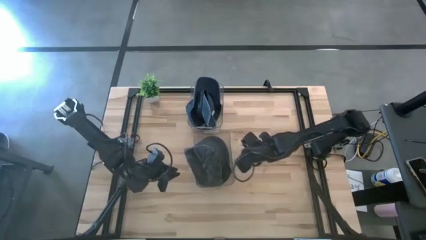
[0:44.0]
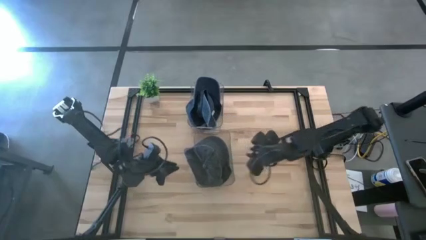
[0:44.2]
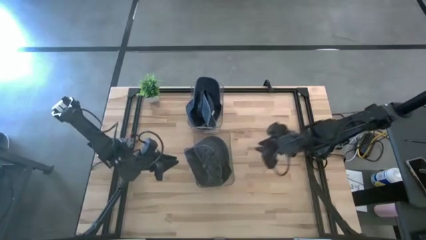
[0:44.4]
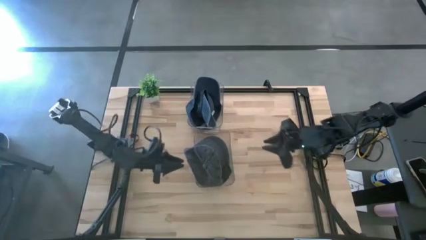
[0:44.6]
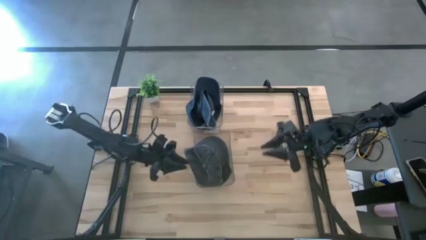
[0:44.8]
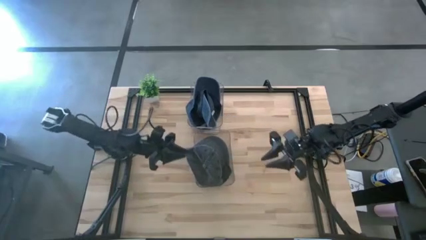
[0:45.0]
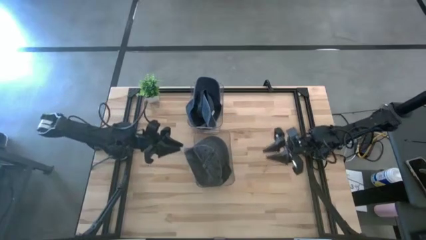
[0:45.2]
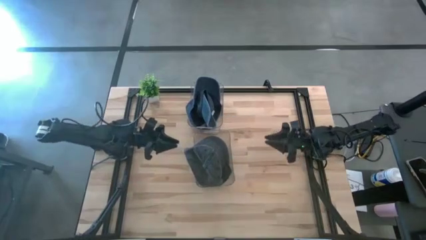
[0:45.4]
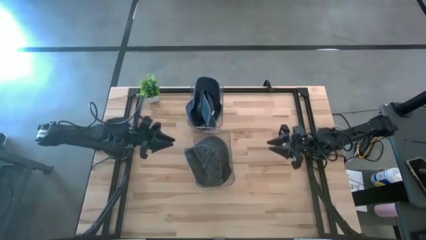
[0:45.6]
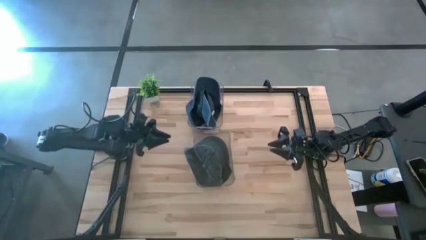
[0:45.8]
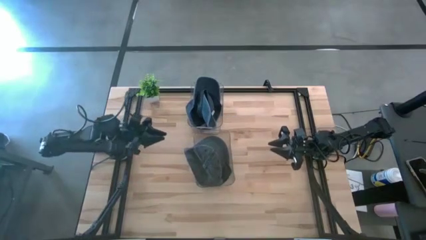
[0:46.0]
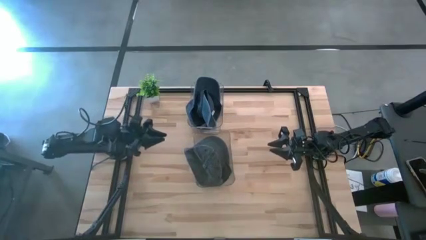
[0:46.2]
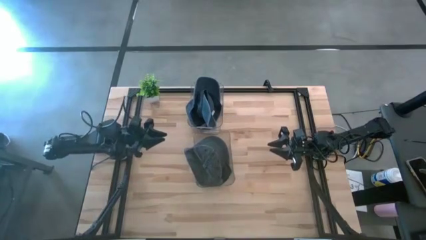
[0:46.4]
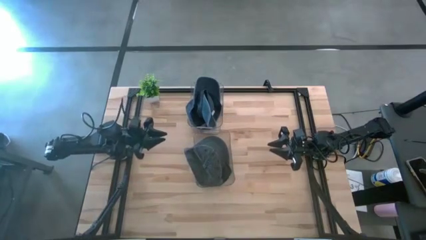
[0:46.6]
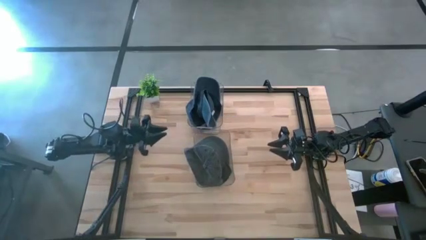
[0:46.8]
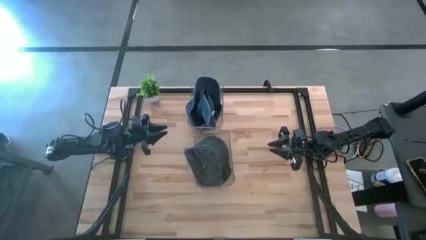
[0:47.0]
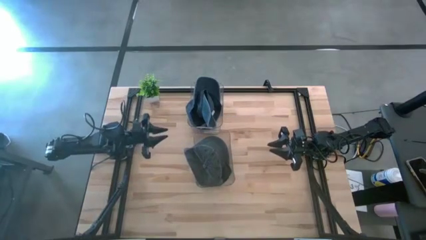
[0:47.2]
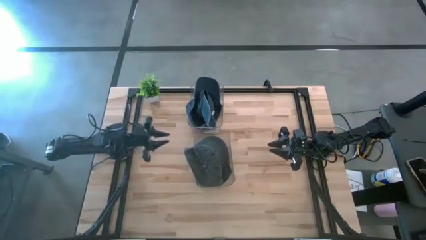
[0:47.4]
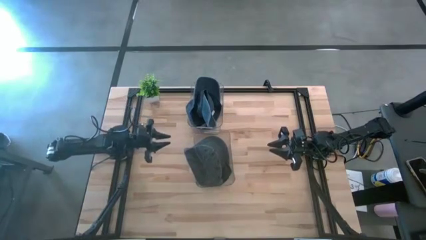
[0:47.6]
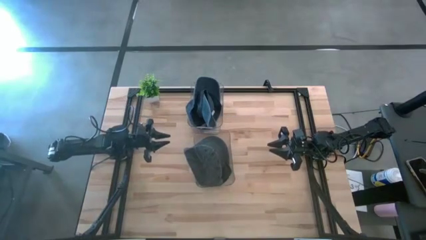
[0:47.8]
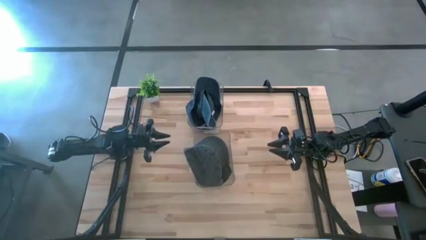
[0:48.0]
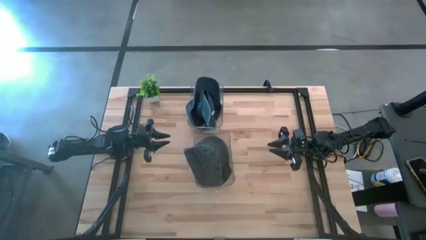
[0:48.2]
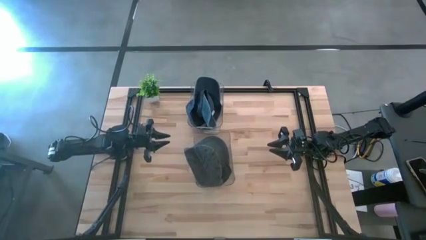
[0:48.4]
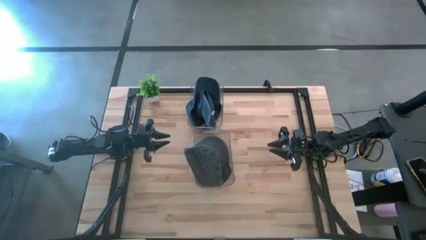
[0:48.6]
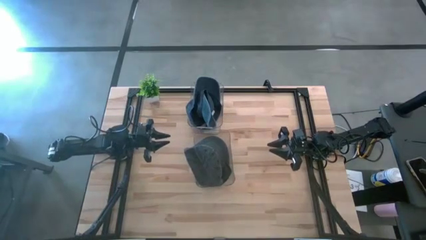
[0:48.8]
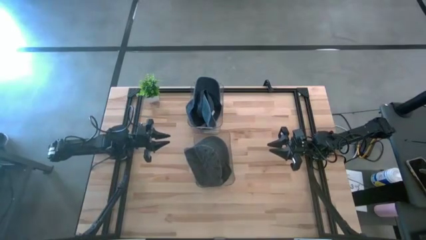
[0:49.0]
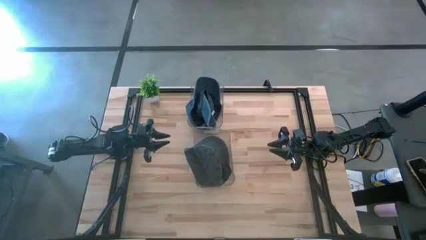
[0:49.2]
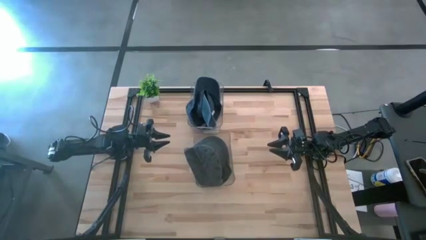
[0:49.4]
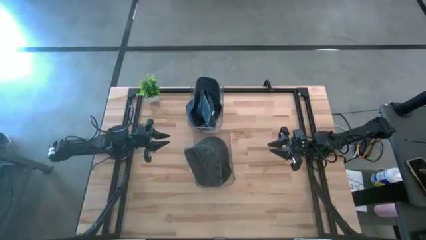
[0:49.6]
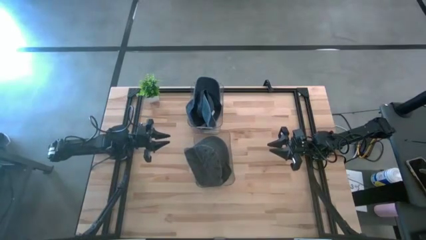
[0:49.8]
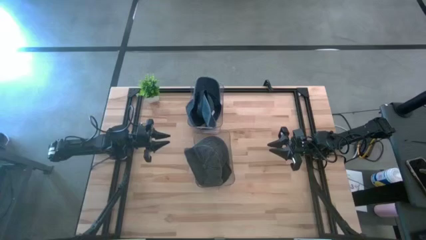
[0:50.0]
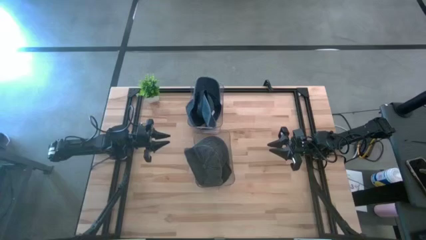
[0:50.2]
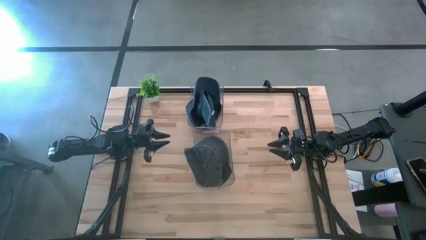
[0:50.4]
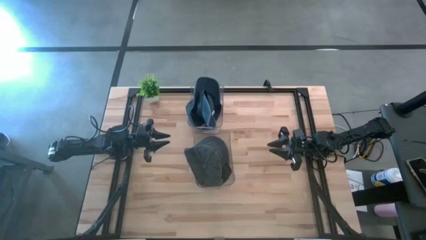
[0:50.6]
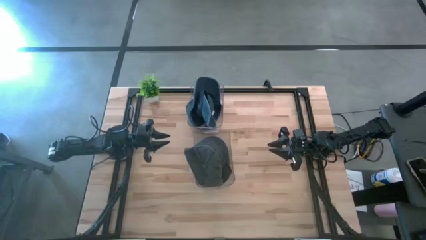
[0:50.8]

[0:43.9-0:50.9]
Task: Pick & Place hat
Return to Home Position

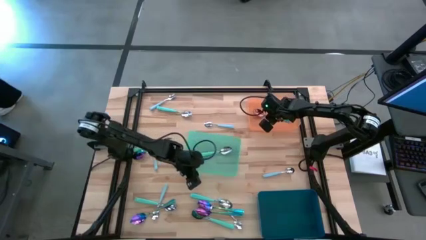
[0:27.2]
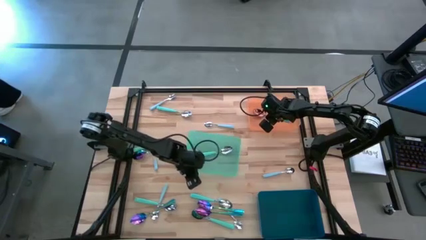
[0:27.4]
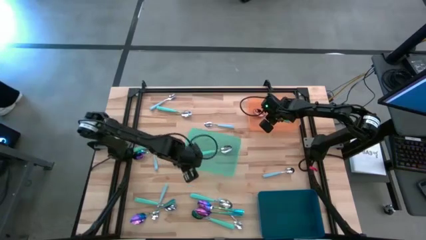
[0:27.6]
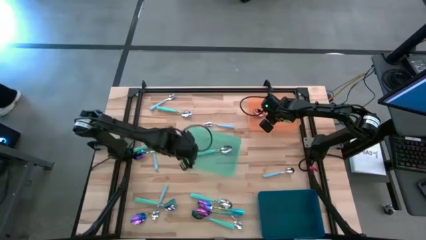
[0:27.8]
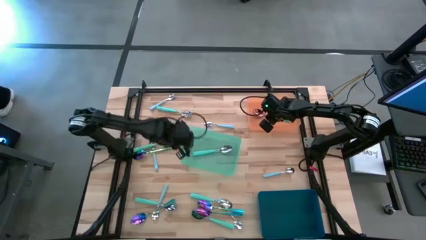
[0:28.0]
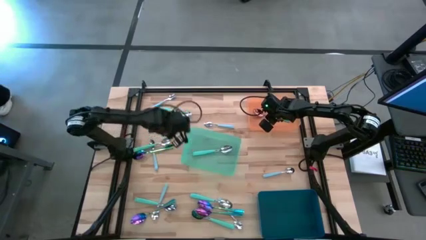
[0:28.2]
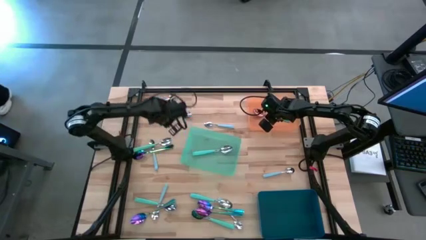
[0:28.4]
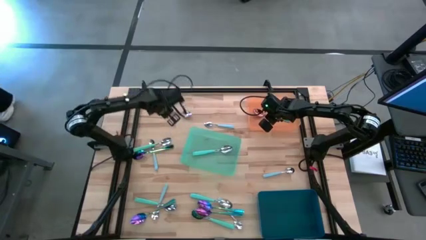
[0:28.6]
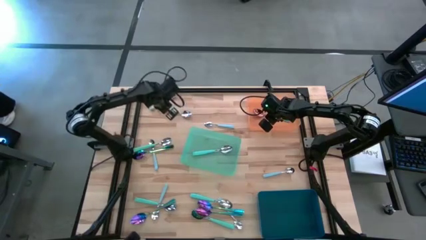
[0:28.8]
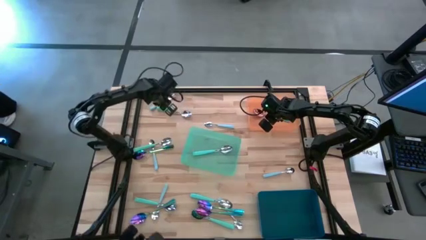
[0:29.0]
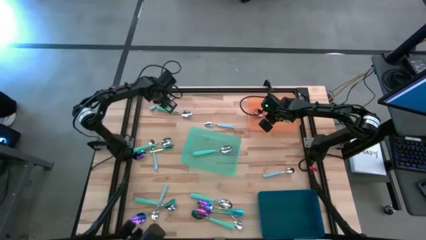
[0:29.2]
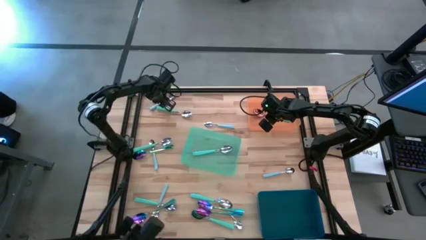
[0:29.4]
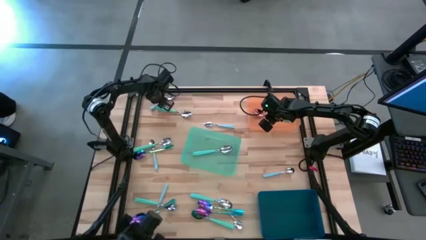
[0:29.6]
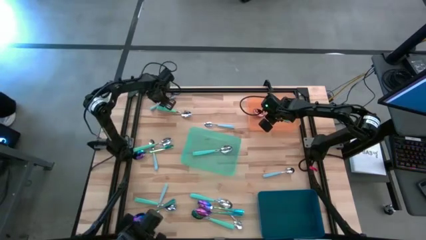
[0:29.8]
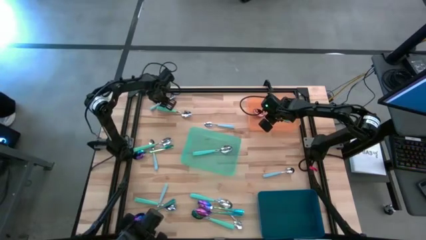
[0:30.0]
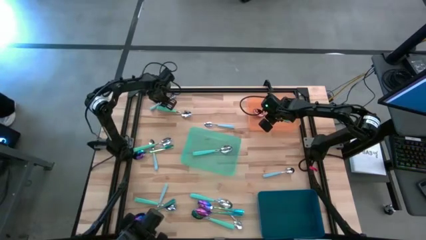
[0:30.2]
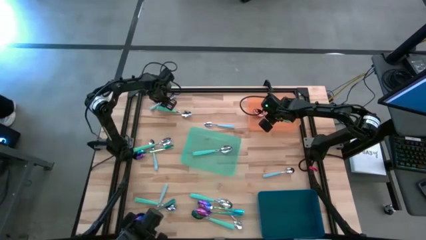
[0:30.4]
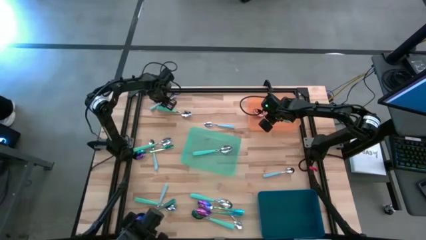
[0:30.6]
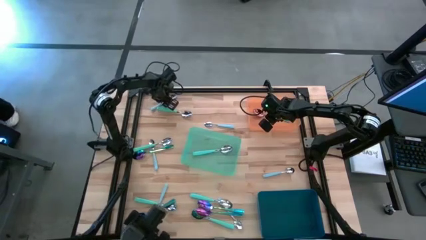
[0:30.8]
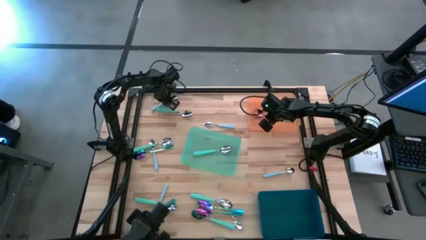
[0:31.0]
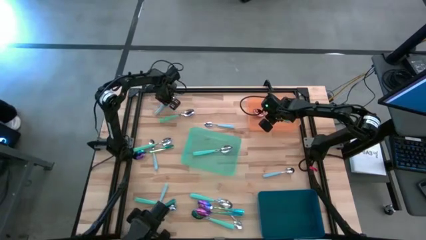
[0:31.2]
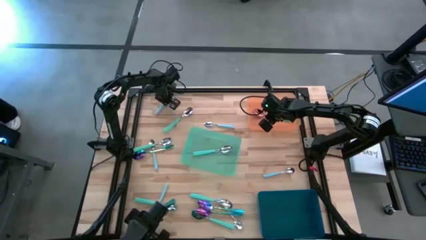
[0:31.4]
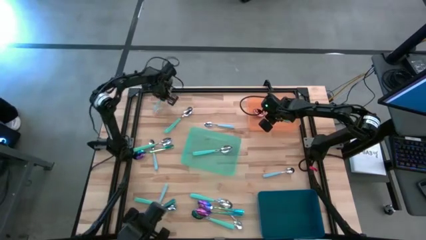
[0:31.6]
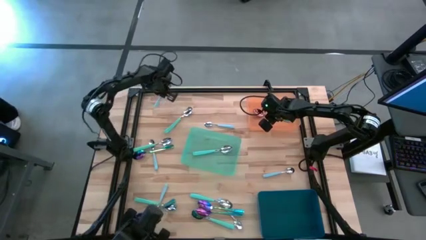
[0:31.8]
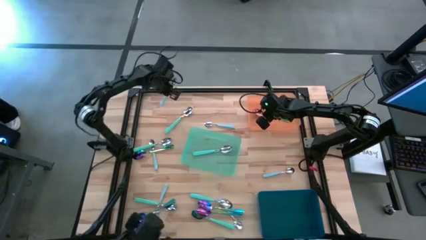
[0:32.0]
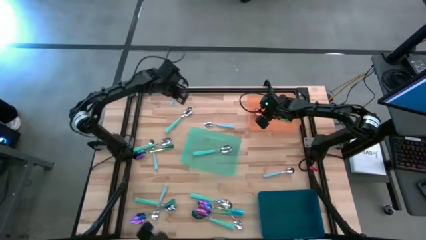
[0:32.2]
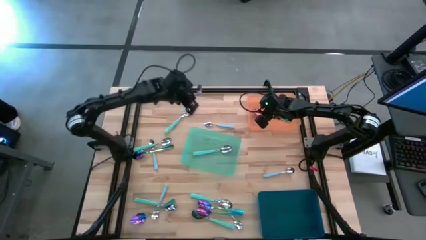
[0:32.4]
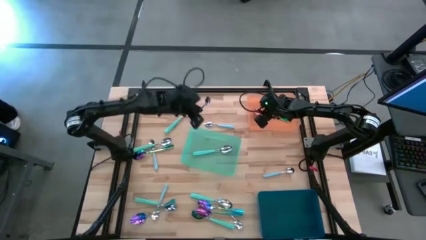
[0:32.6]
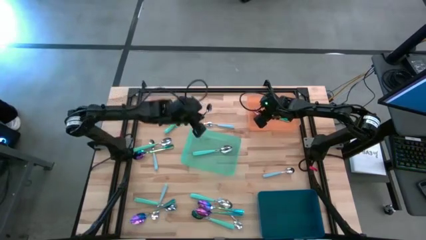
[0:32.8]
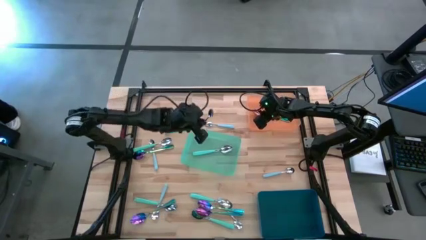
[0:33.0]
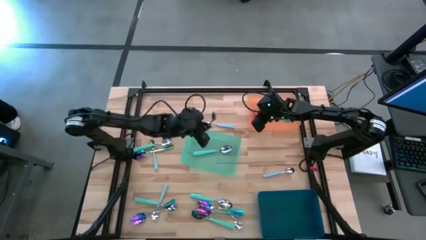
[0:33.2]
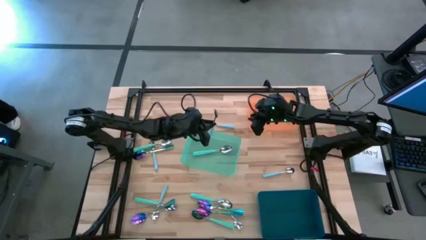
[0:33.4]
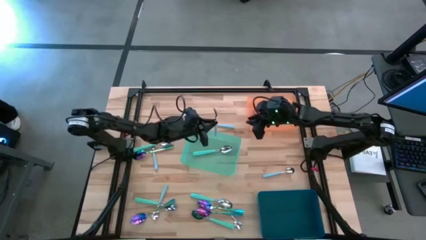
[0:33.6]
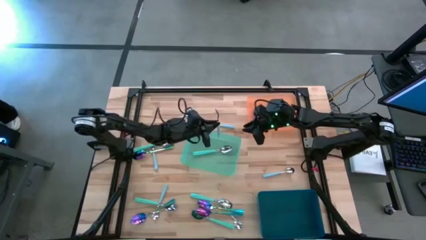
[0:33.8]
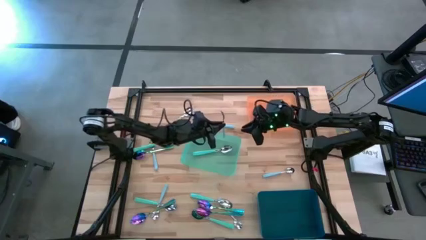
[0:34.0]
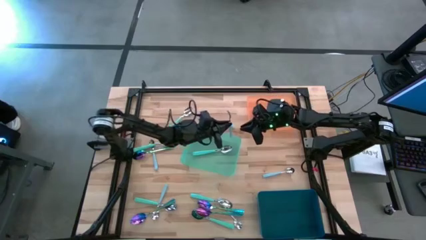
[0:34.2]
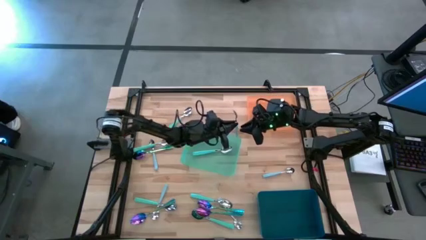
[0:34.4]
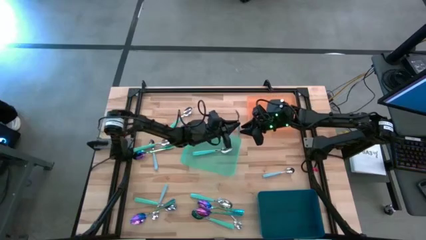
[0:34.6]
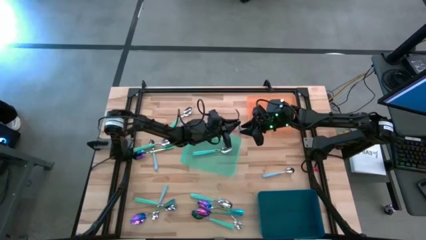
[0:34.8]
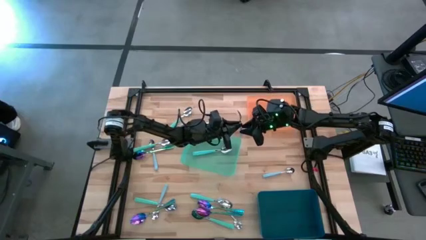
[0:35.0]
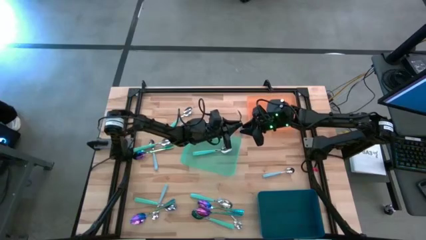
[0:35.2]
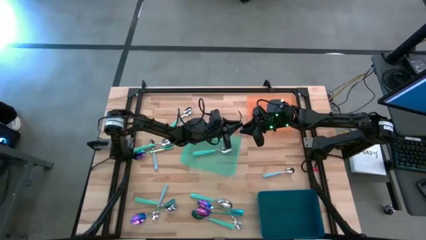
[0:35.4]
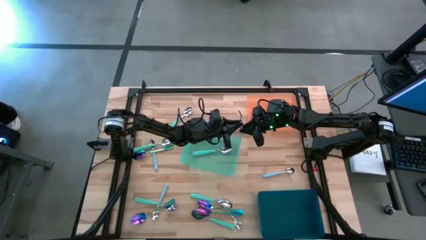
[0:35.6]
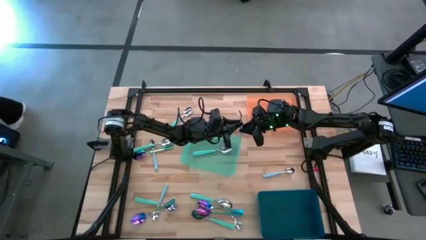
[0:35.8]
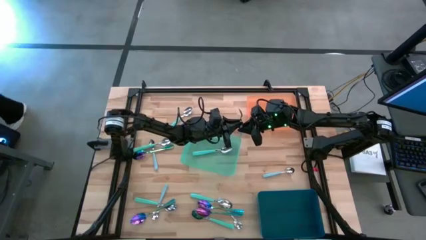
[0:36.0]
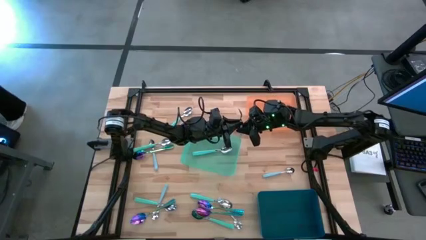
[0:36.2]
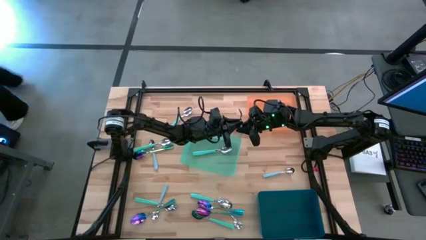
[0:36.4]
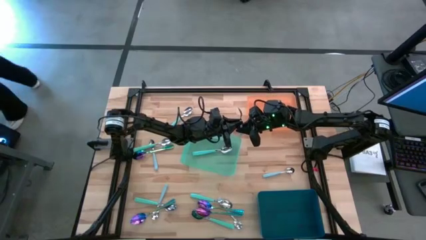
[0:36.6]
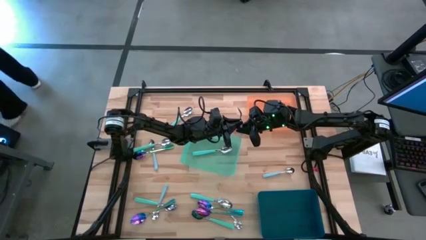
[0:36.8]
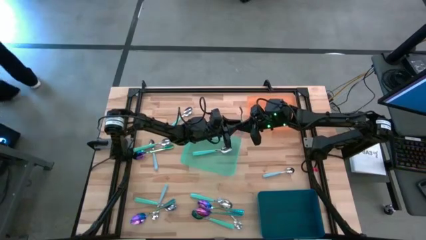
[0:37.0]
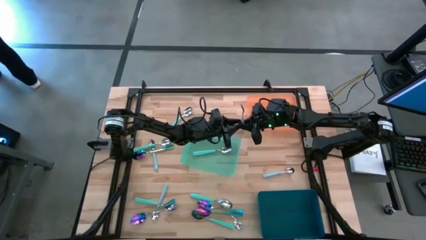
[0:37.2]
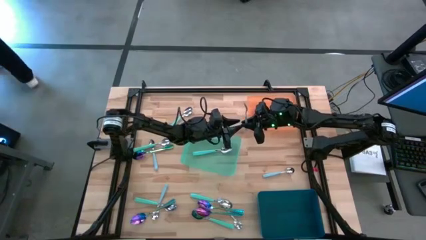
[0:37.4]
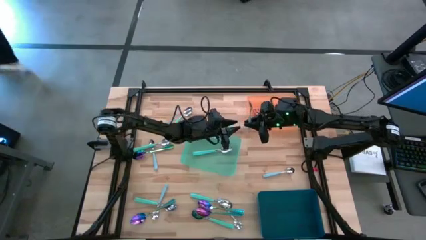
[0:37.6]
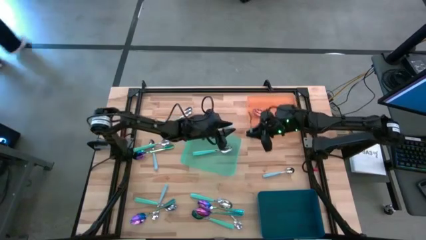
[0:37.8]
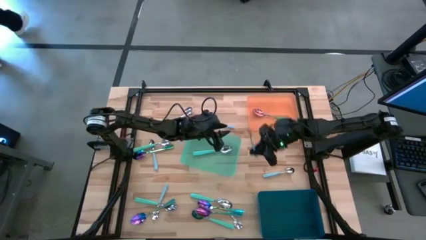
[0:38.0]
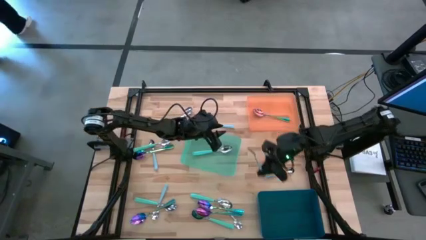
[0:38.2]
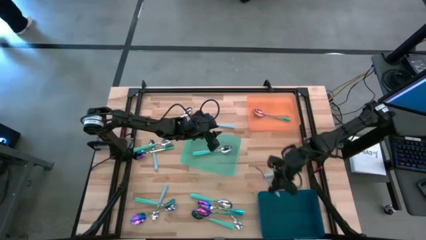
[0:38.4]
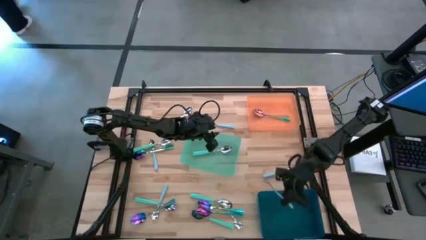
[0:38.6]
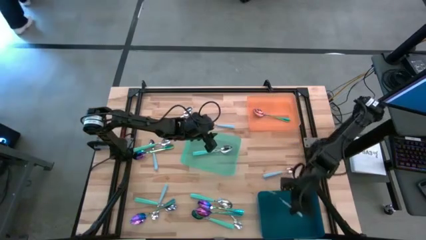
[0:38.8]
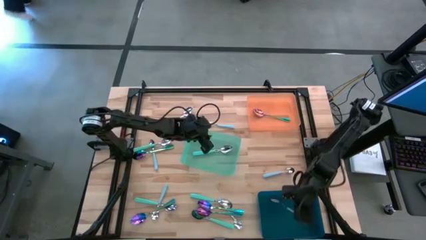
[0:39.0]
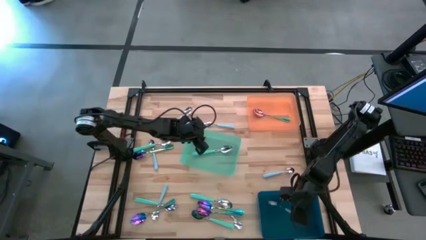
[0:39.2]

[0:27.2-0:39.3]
Task: Sort silverware by color (type)
Put the blue spoon into the blue bin
